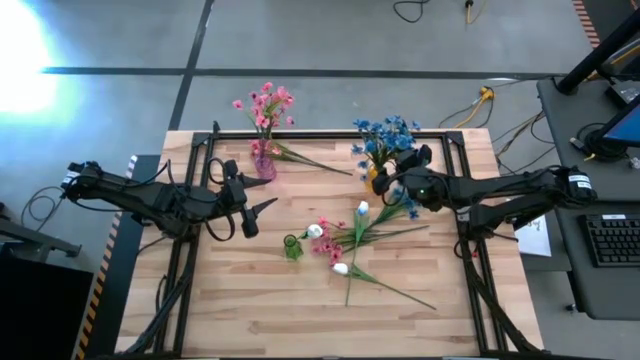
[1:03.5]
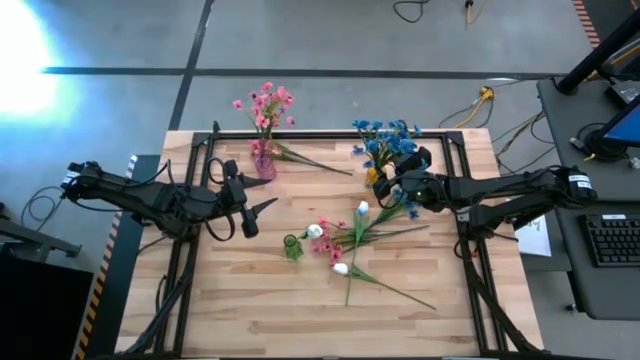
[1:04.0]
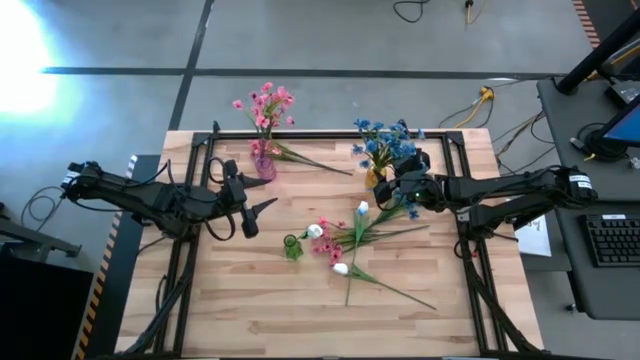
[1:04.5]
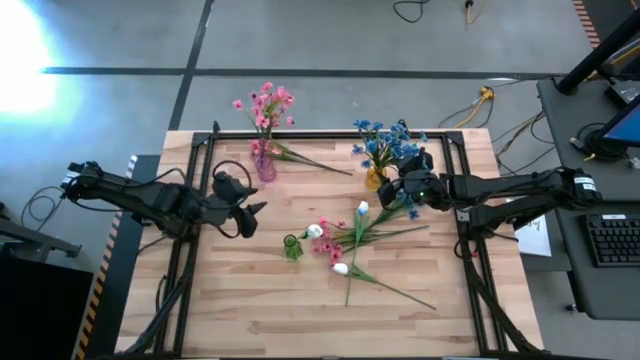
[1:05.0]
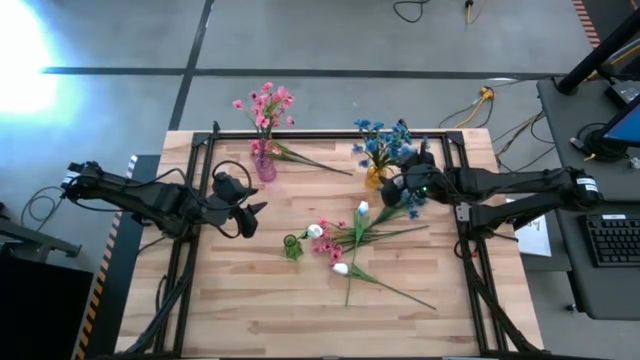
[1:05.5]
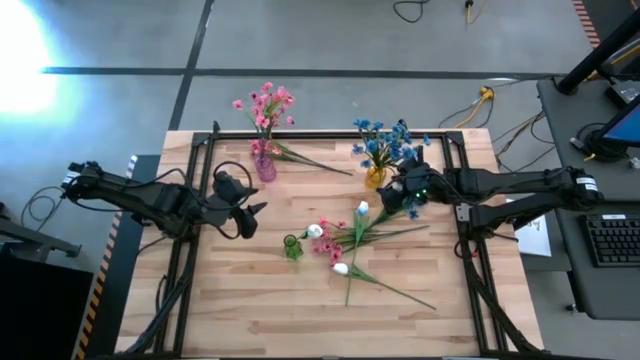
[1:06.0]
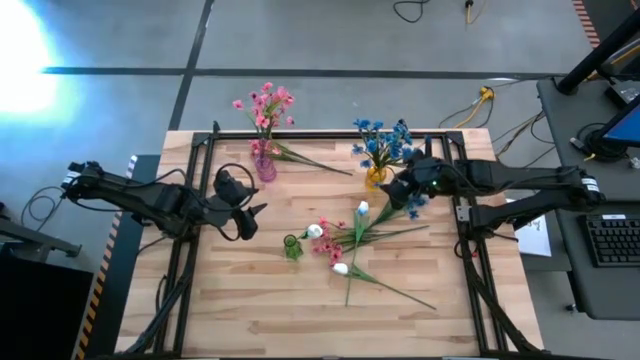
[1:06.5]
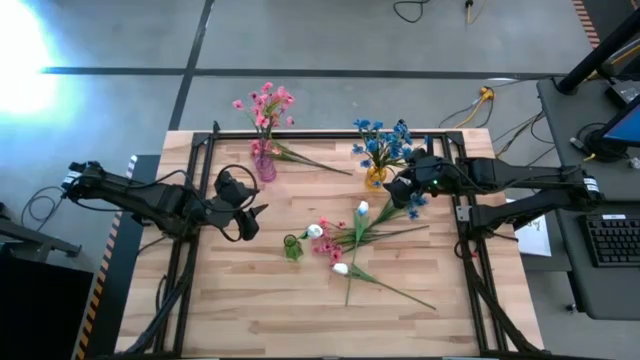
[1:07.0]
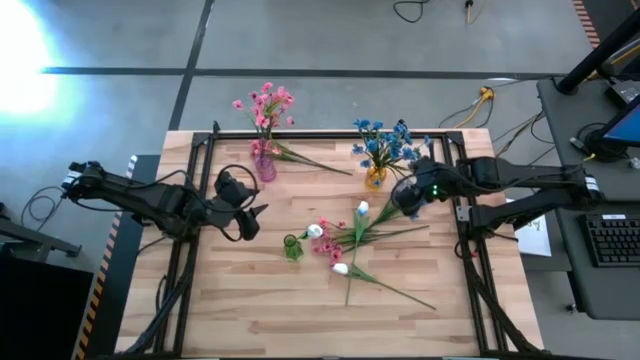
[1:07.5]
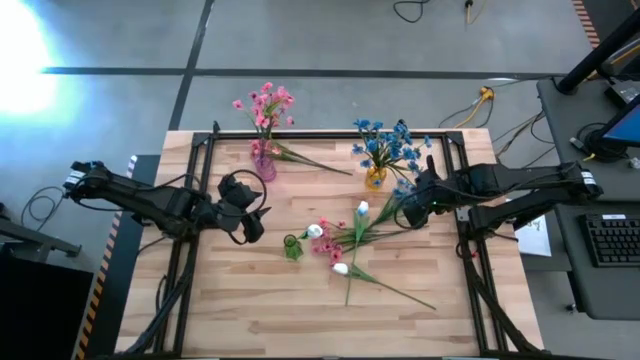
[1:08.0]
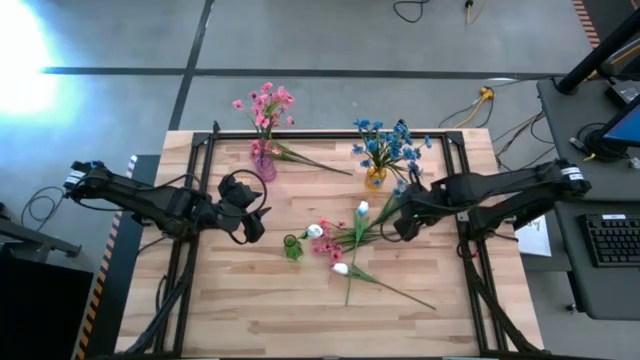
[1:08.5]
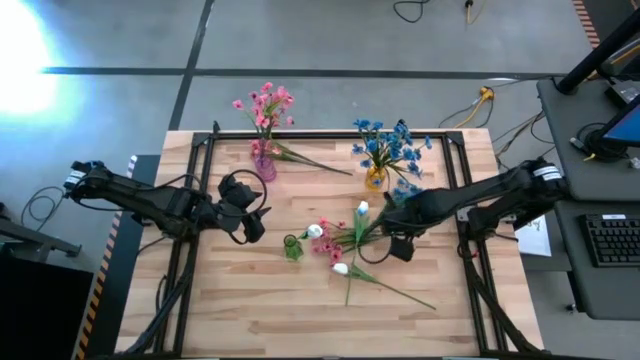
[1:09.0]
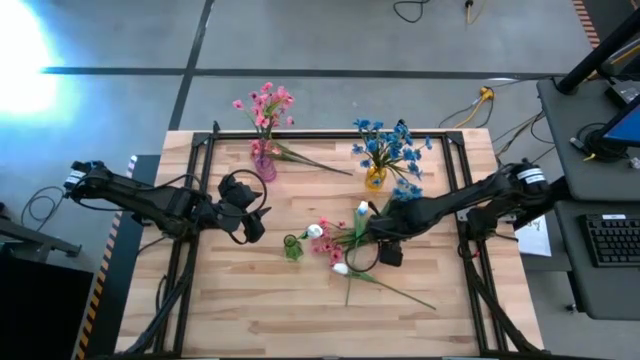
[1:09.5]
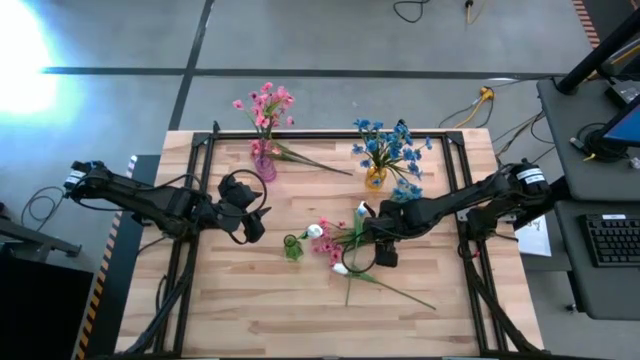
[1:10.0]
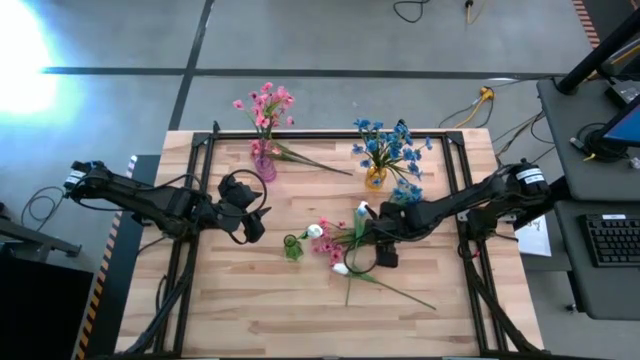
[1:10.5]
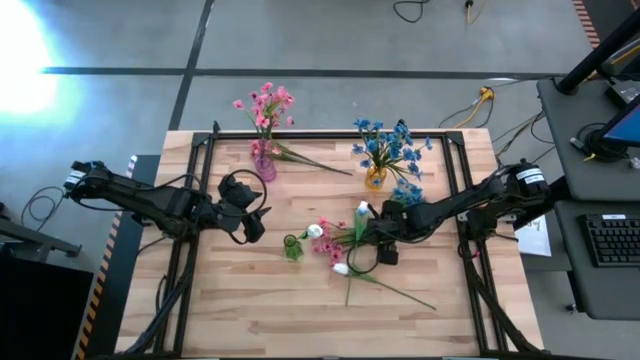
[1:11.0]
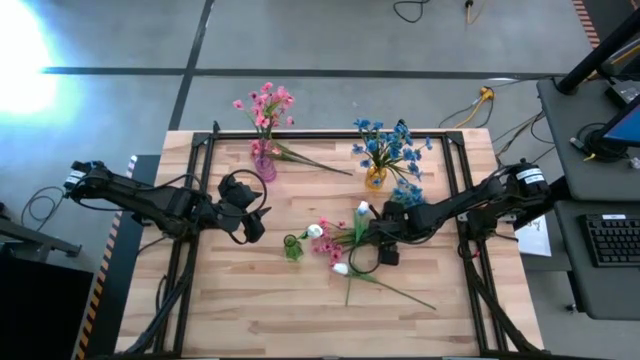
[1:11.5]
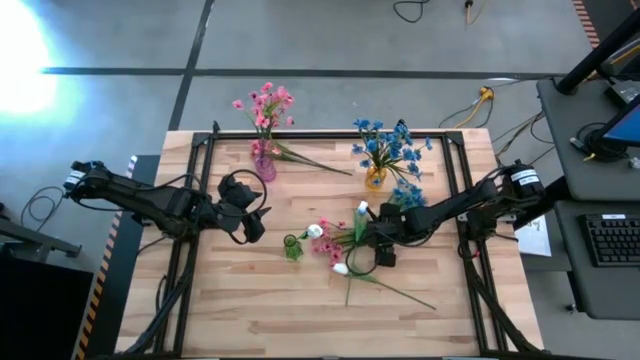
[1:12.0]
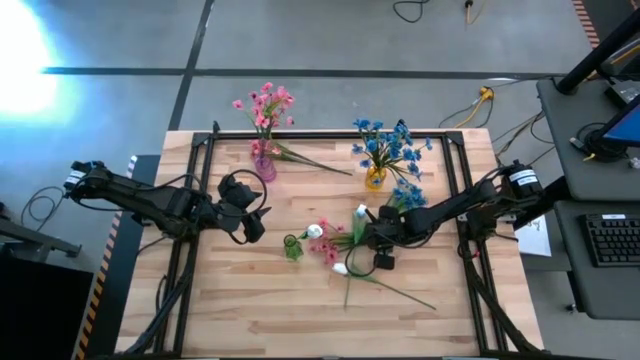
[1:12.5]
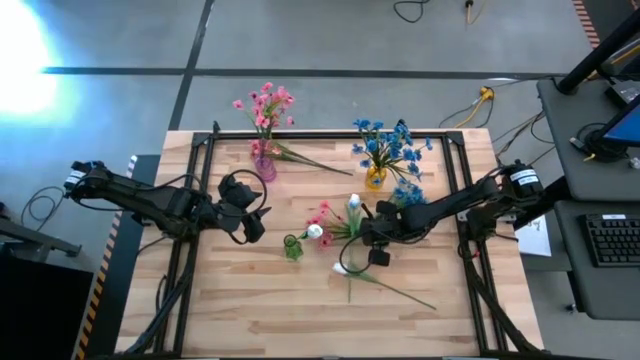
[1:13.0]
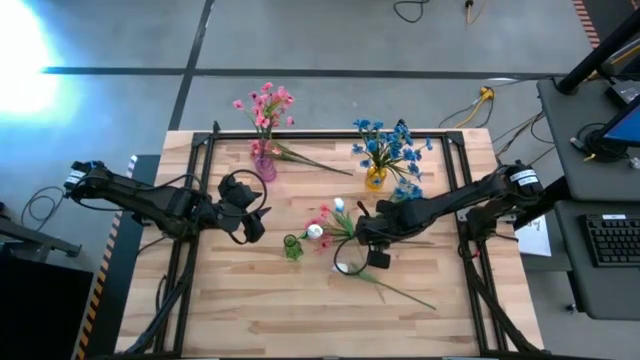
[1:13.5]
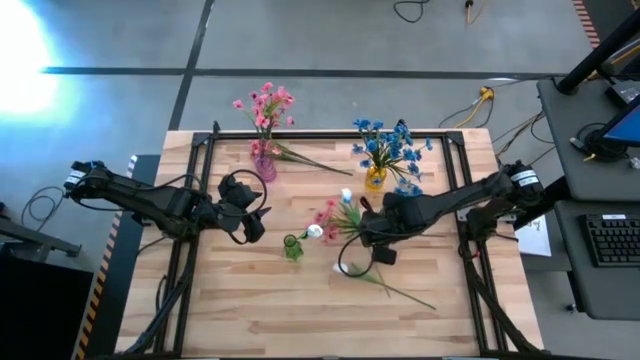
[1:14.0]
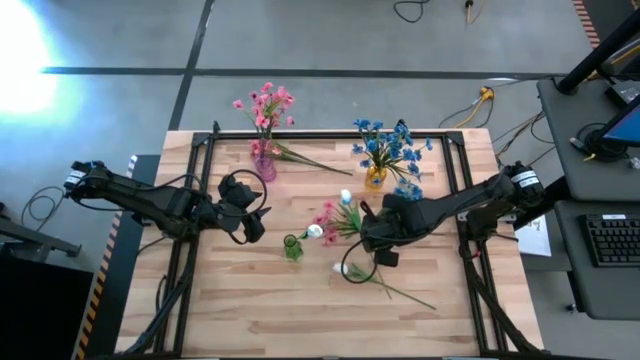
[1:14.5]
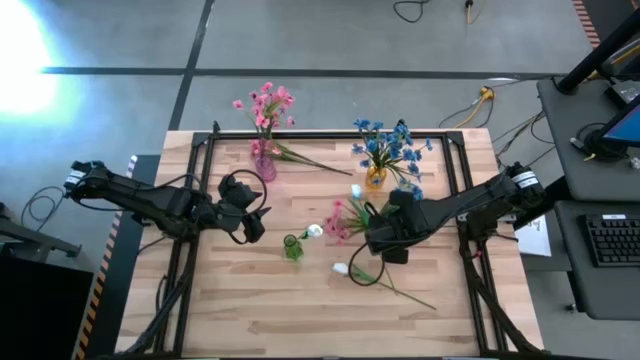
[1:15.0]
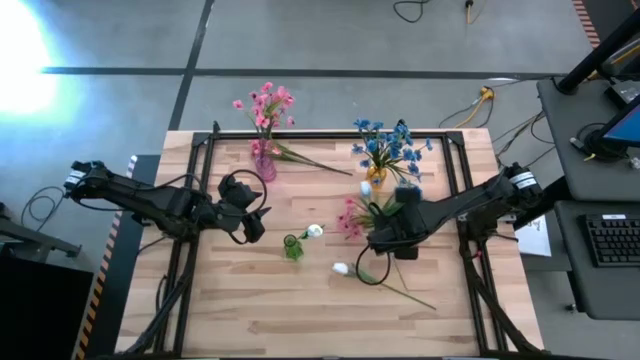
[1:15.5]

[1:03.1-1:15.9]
Task: Sort flowers into vase by color
Put the bottom pink flowers into the pink vase

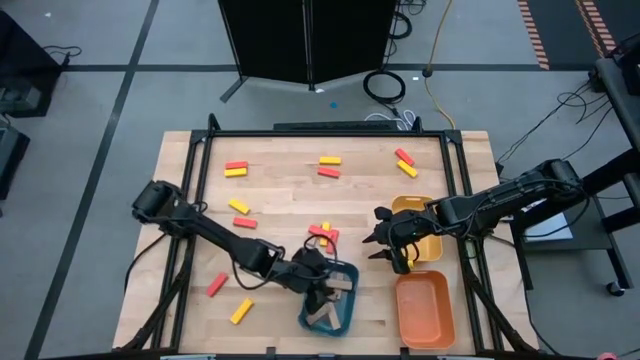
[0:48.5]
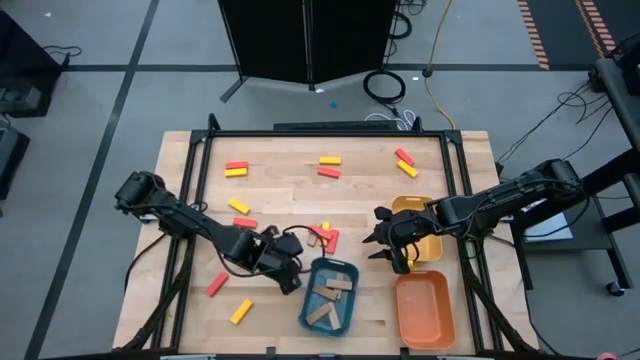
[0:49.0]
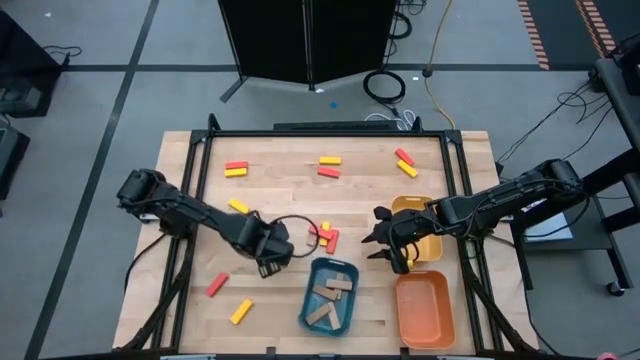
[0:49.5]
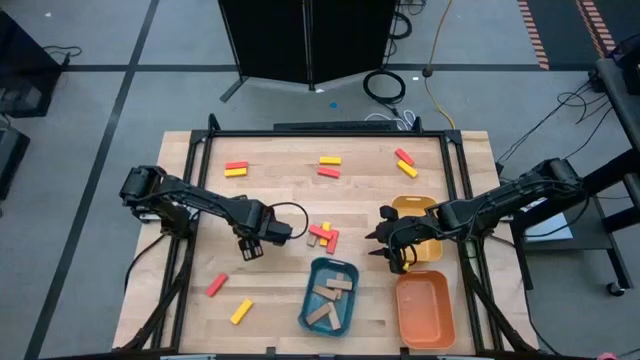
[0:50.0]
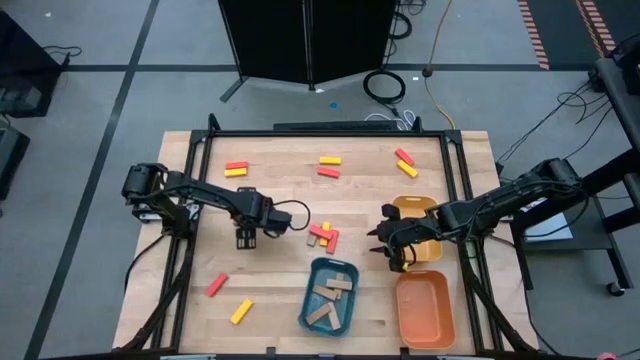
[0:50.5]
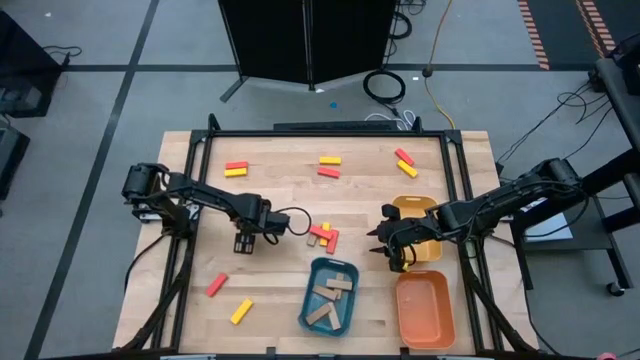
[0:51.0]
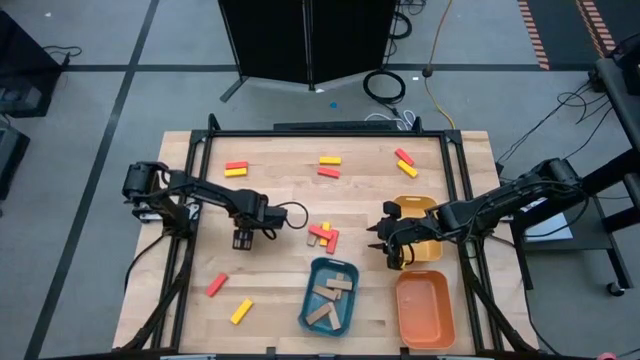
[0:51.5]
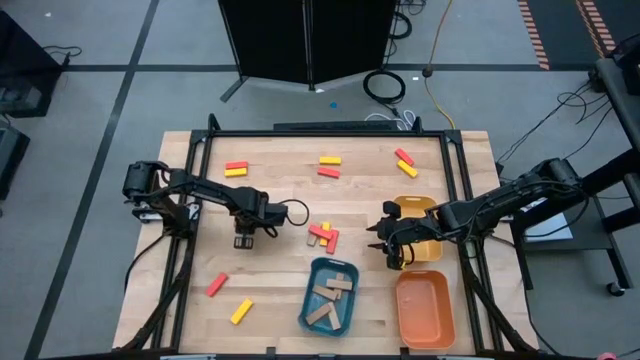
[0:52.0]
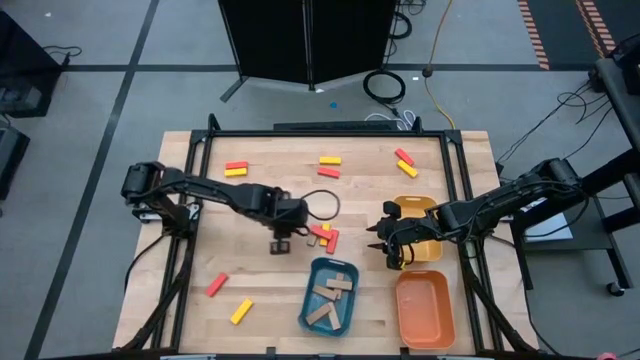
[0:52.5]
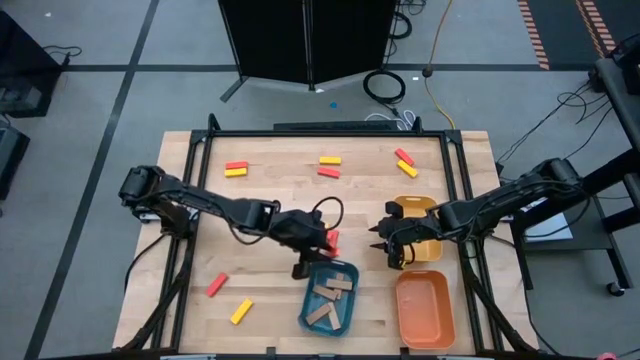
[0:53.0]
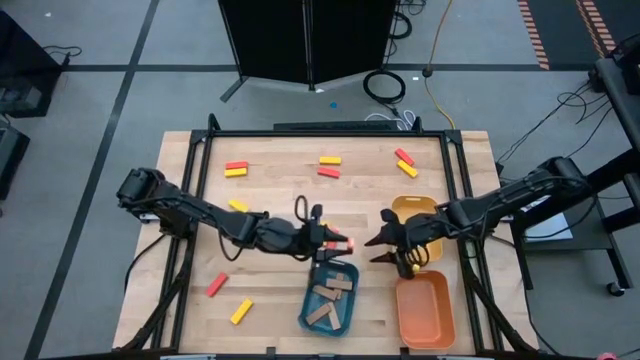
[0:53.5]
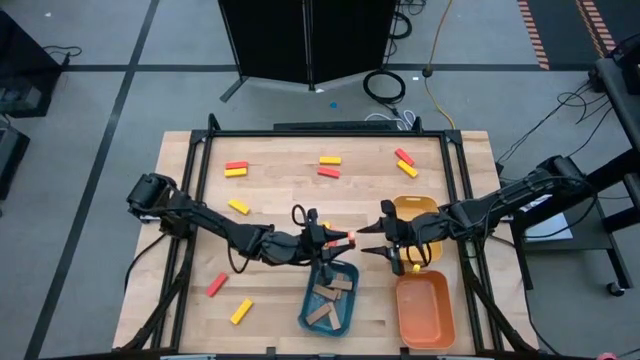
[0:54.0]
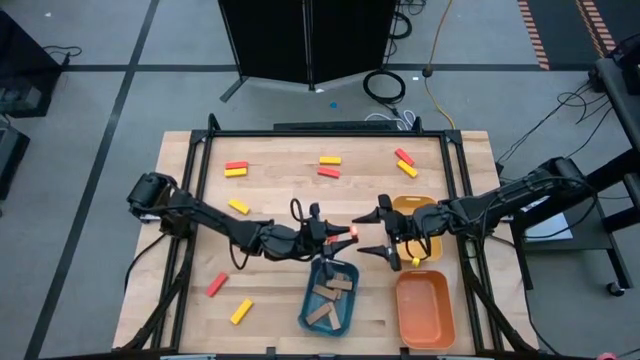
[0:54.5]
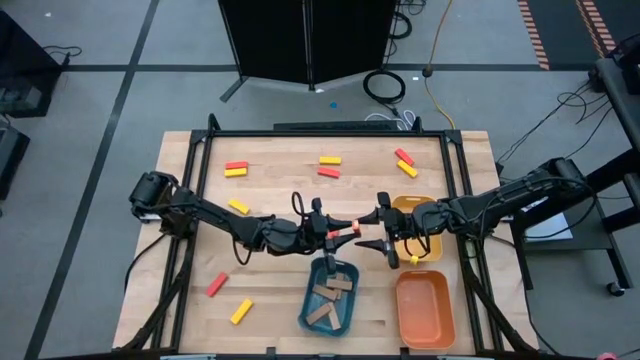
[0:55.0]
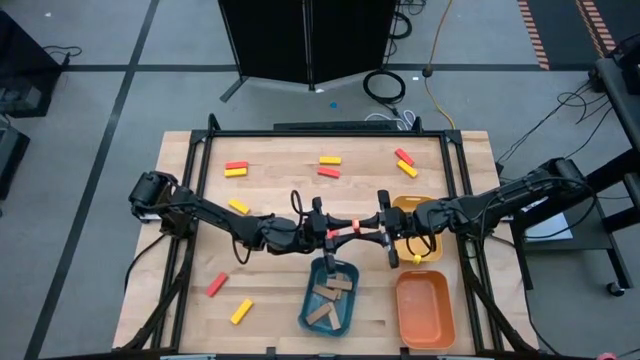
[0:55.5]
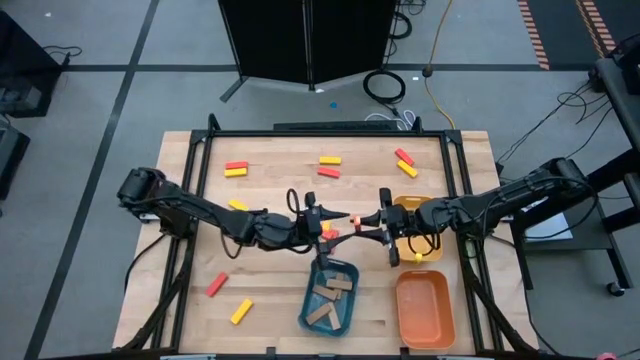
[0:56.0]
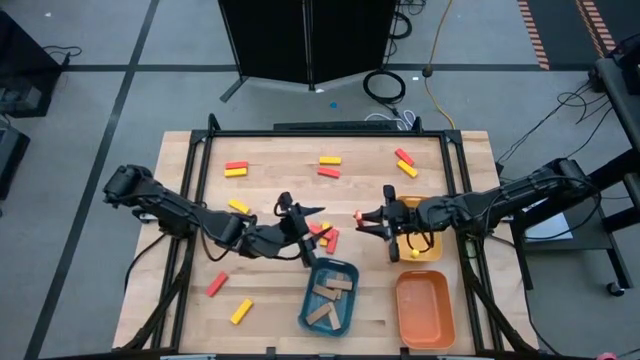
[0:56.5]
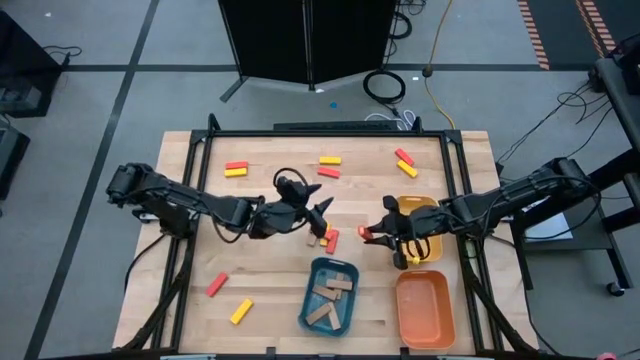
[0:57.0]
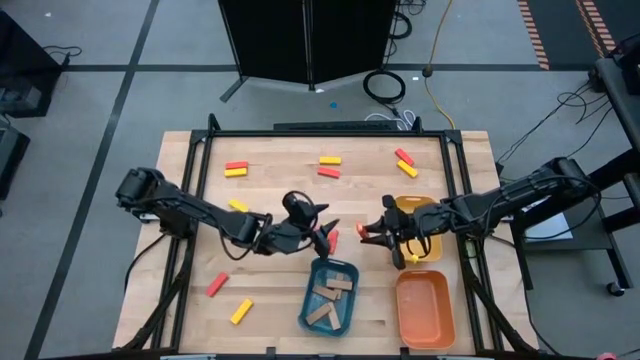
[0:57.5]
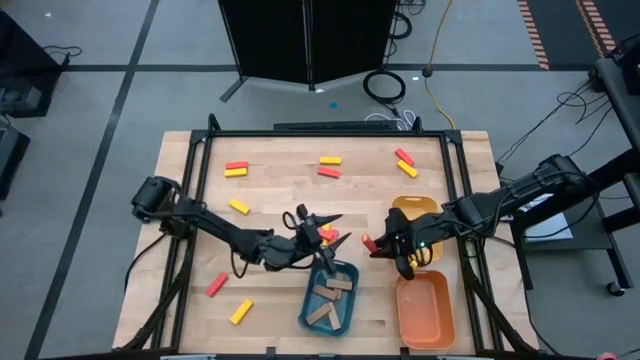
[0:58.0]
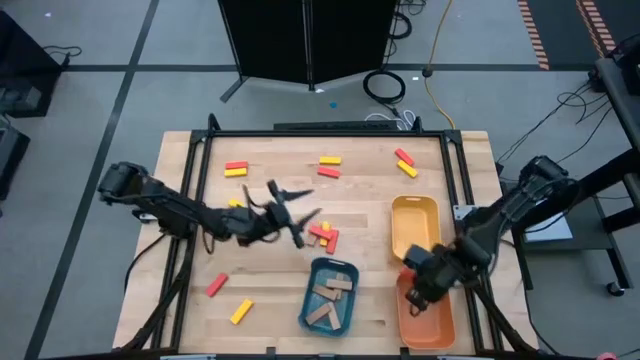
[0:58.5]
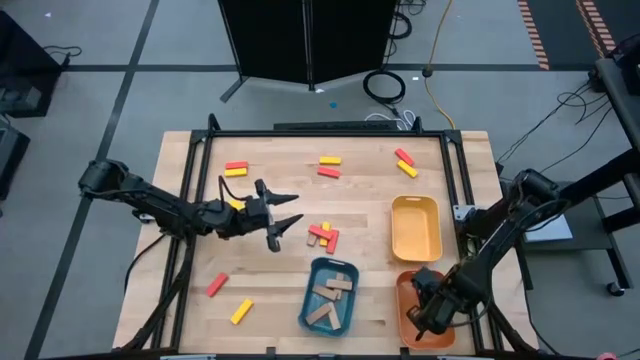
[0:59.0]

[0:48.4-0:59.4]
Task: Sort blocks
Put the orange block into the orange bin
